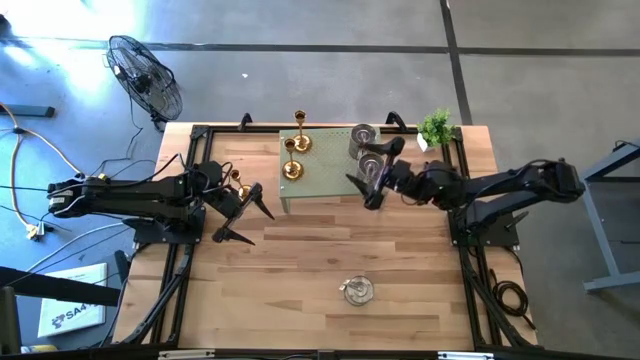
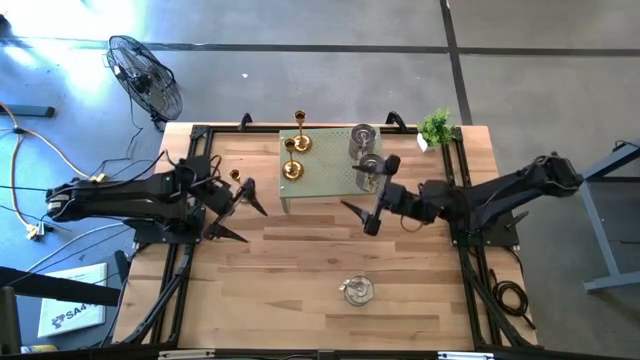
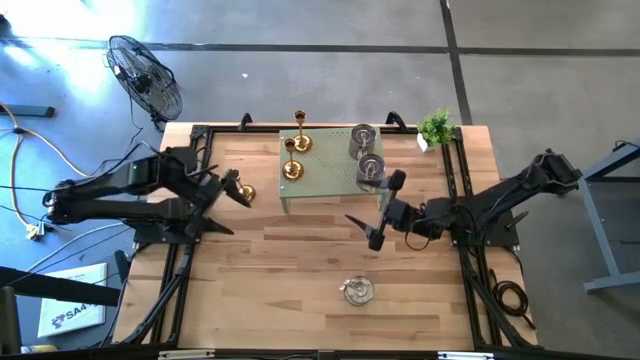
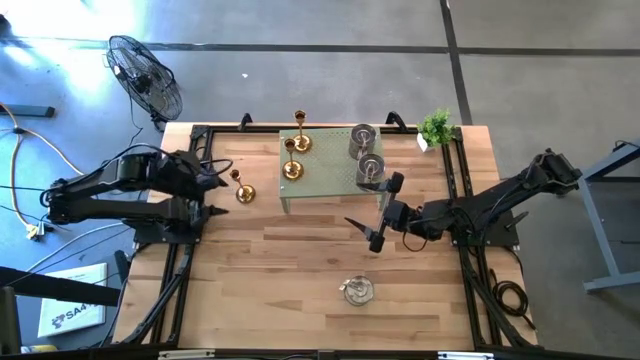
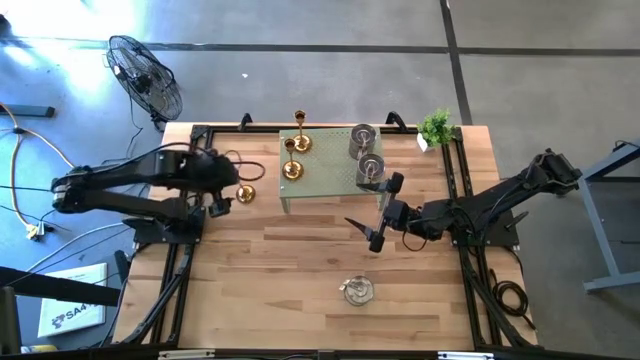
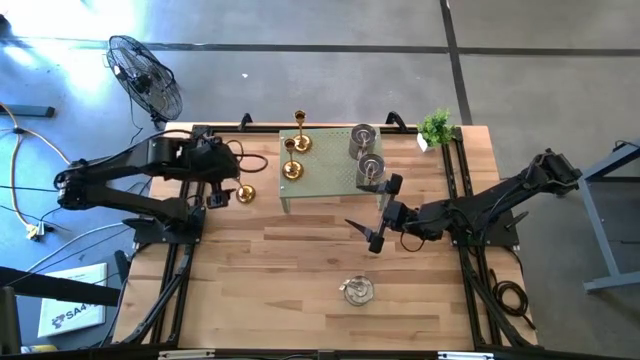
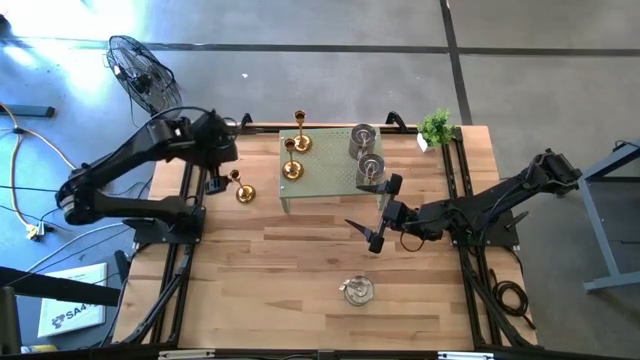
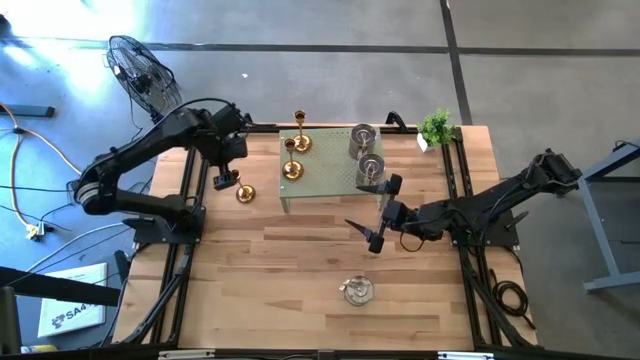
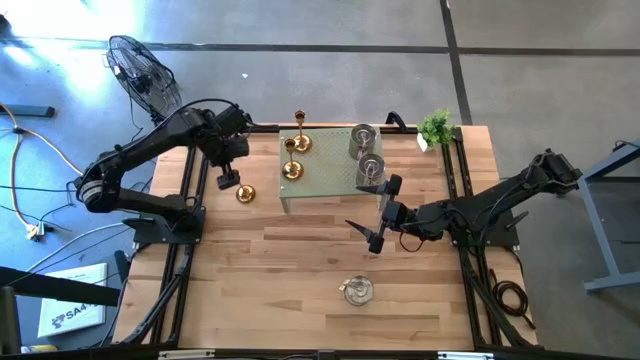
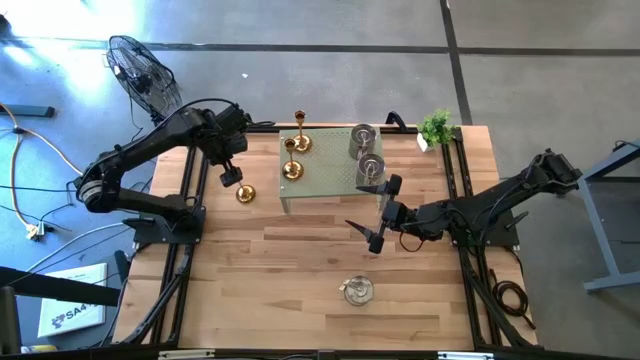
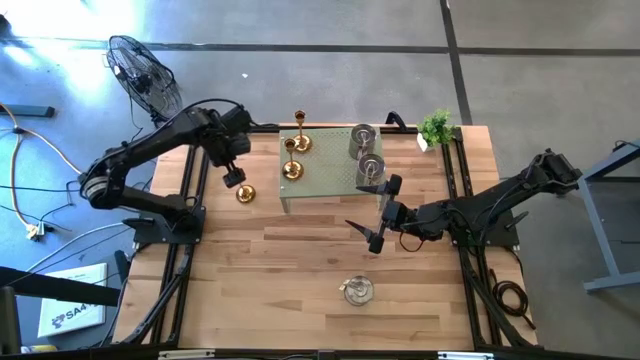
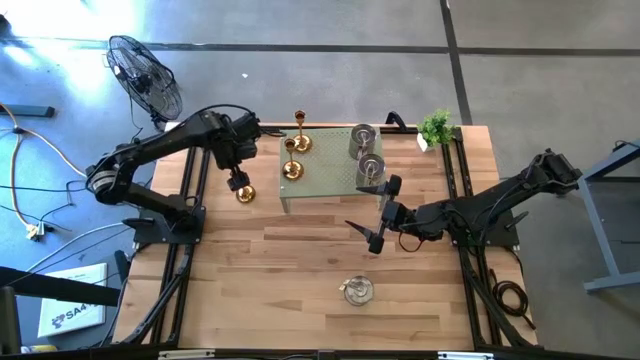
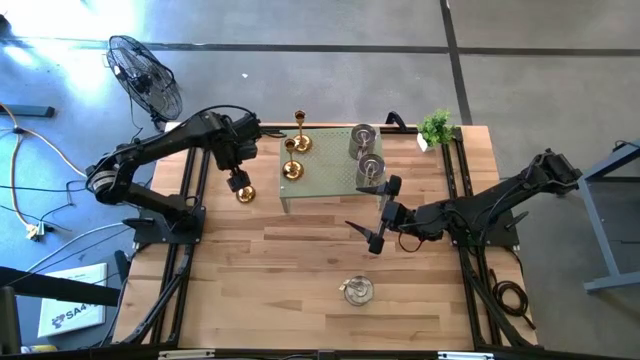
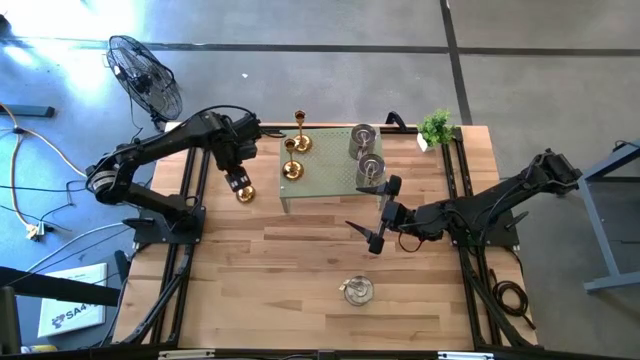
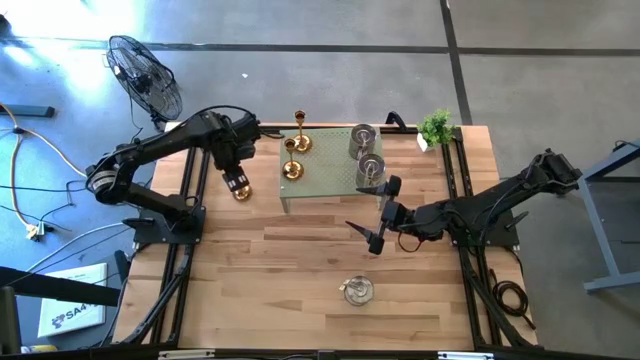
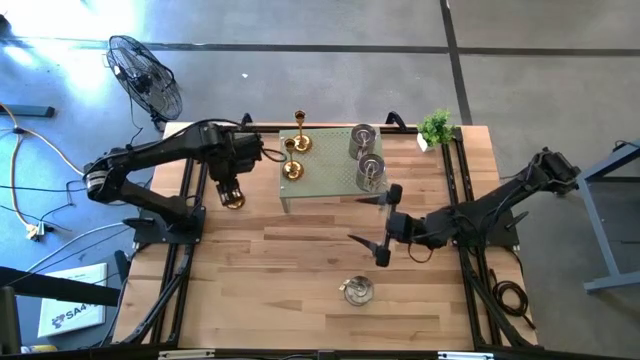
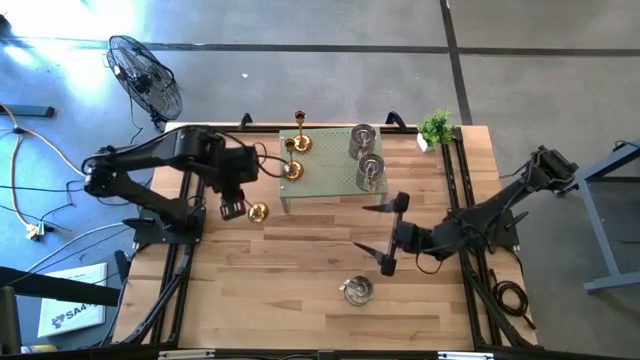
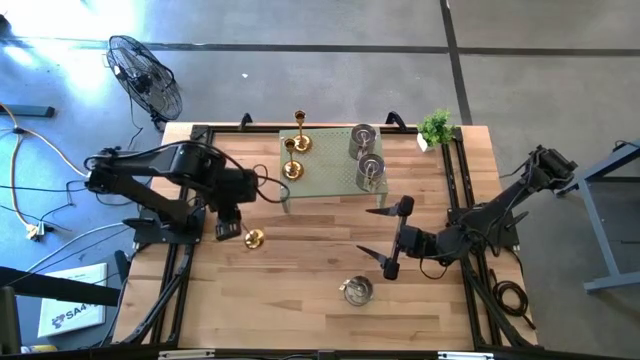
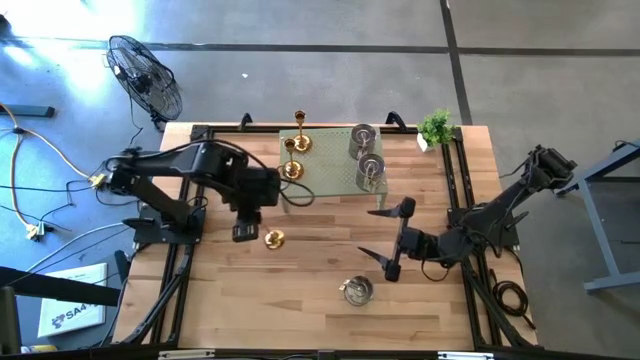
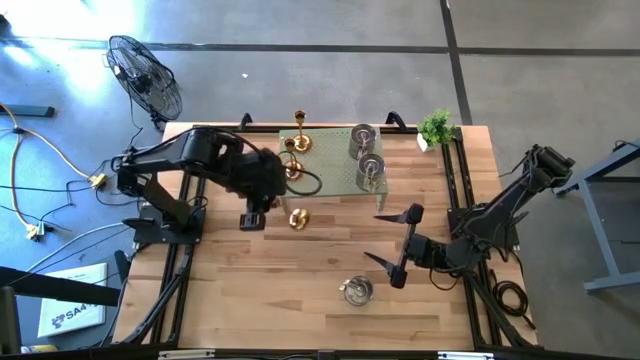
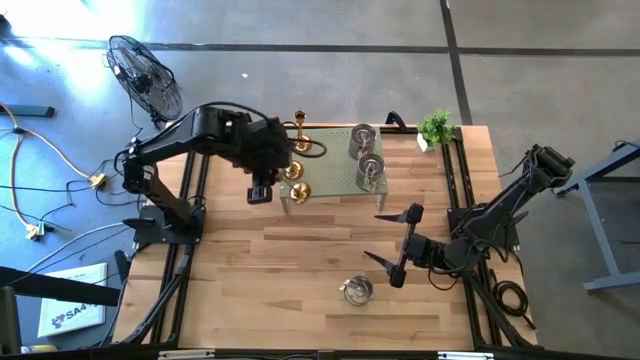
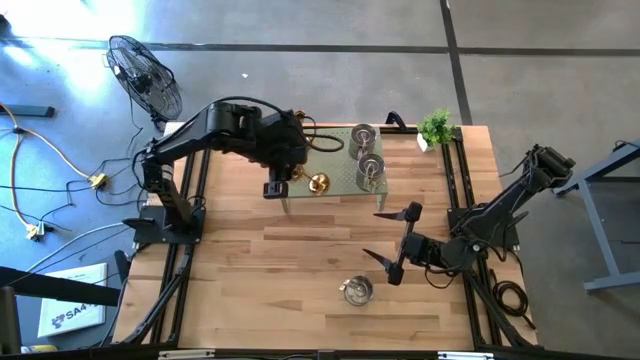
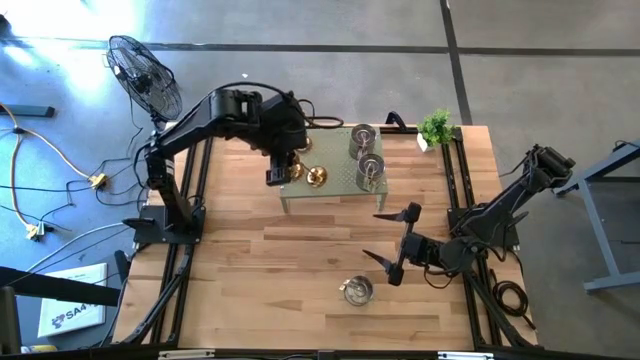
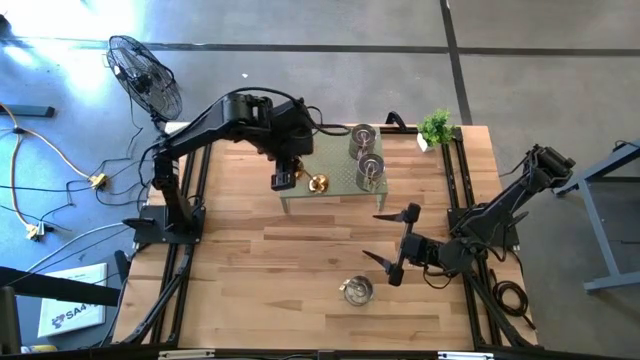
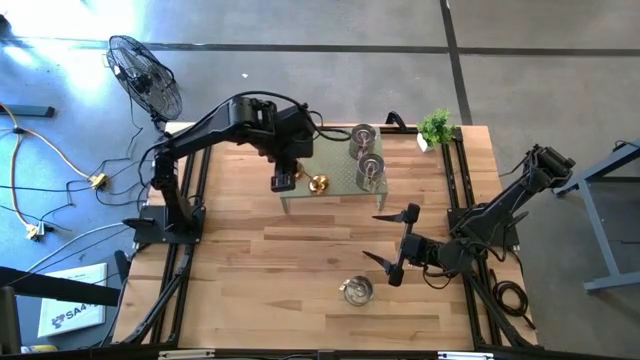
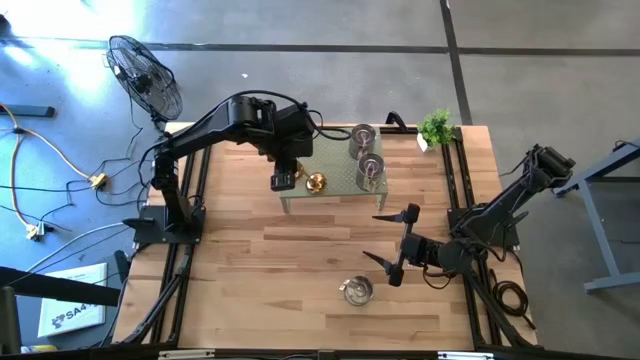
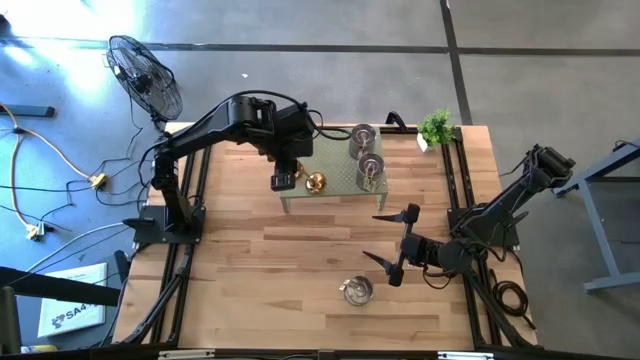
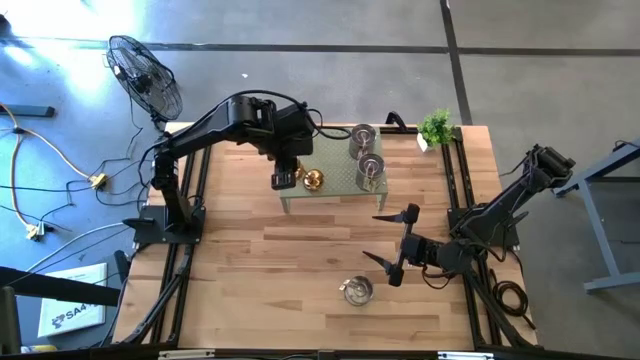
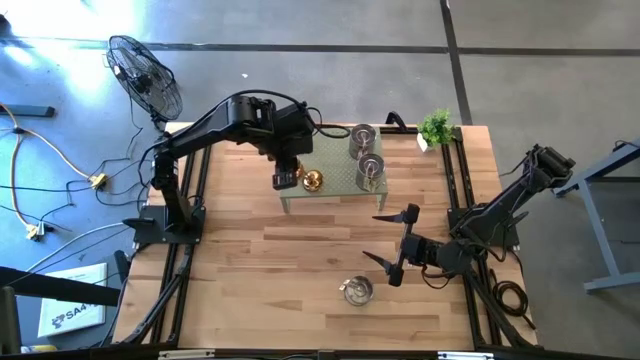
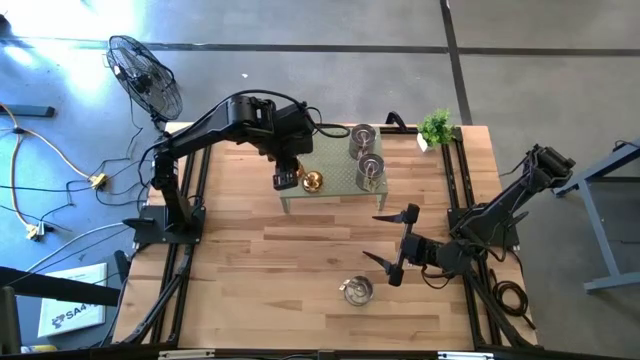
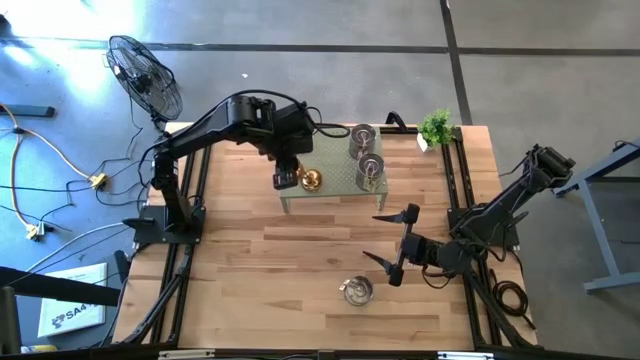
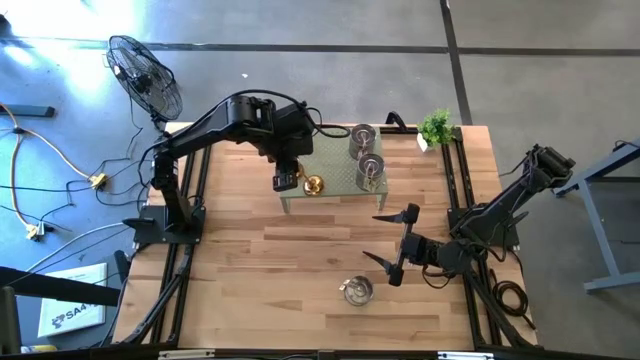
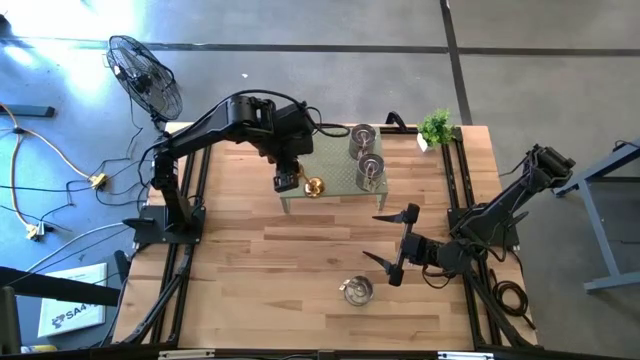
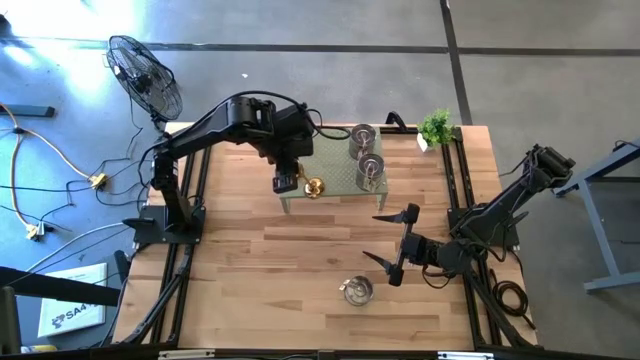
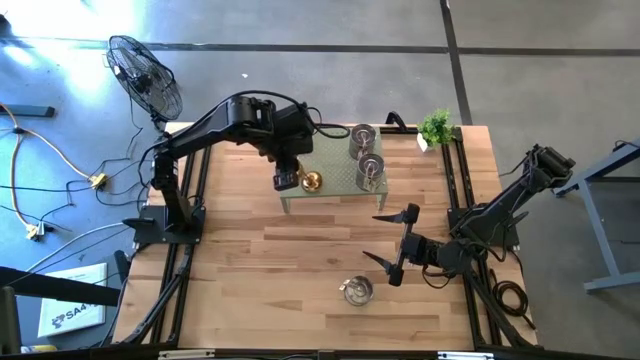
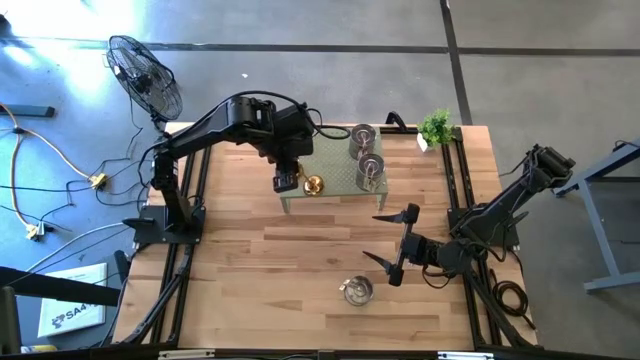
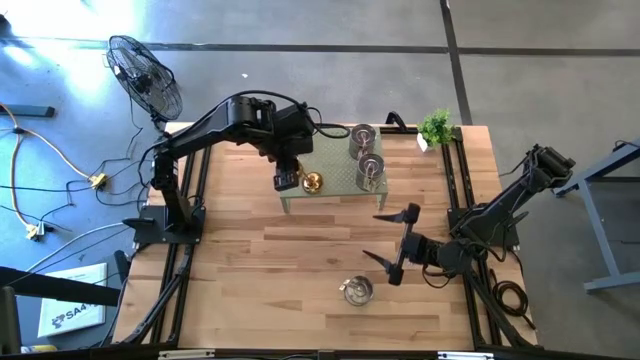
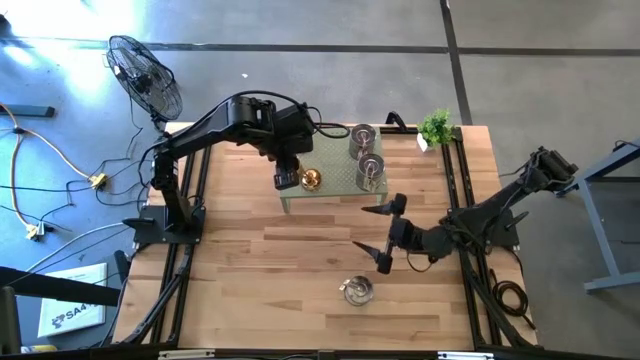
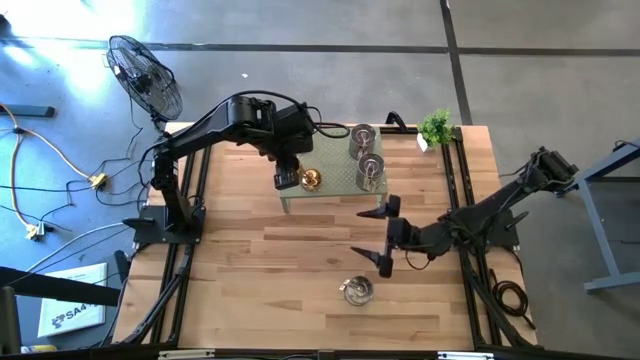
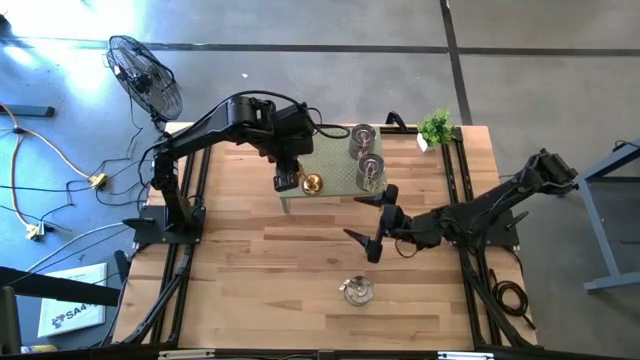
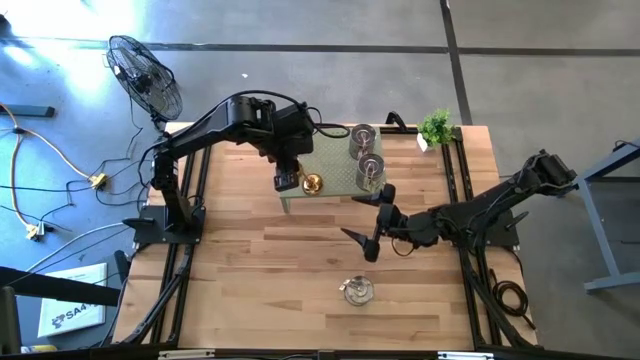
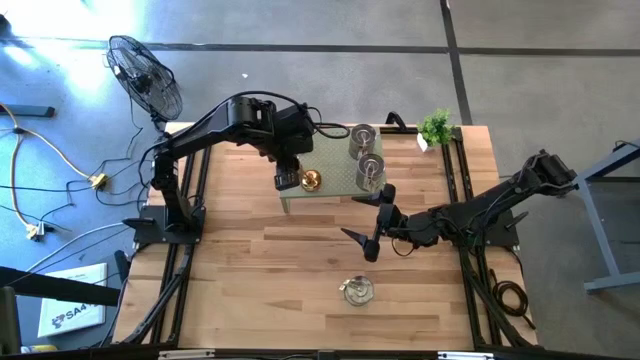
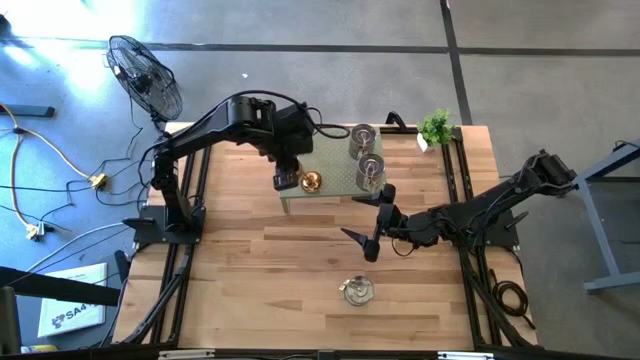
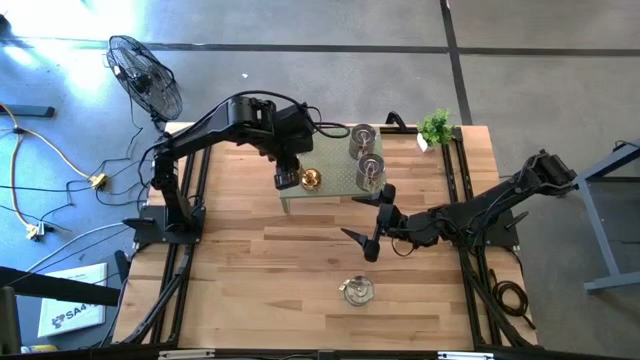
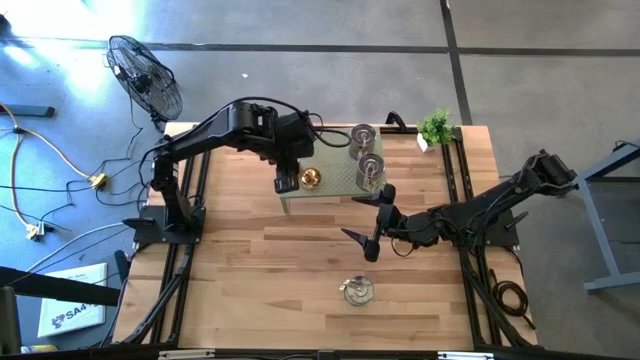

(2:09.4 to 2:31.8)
Task: Pick & Place candle stick holders
Put the gold candle holder on the shelf
